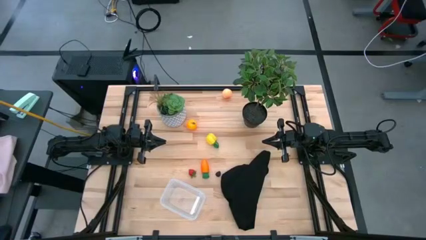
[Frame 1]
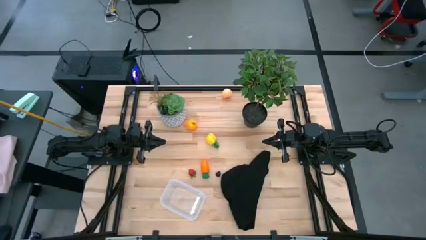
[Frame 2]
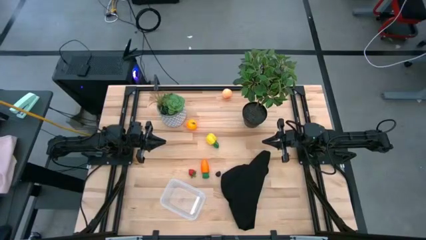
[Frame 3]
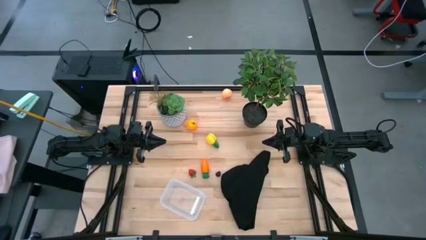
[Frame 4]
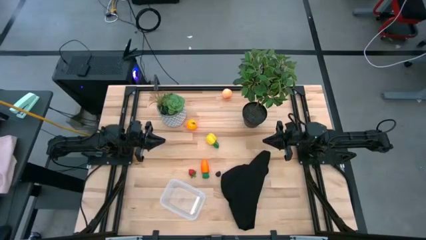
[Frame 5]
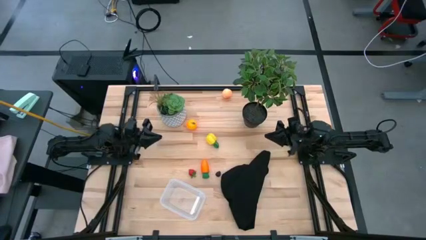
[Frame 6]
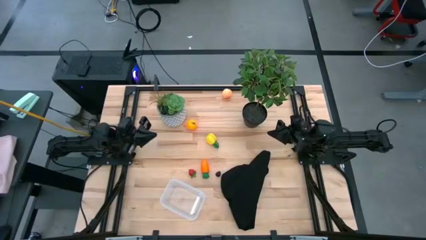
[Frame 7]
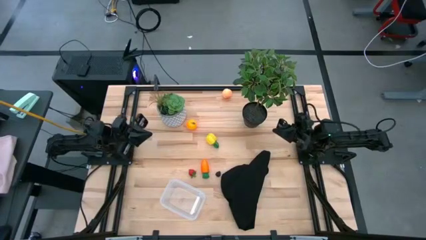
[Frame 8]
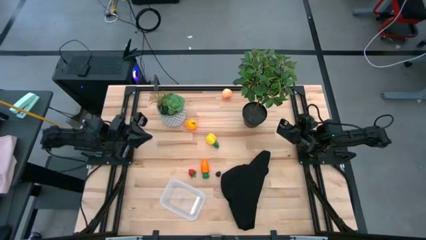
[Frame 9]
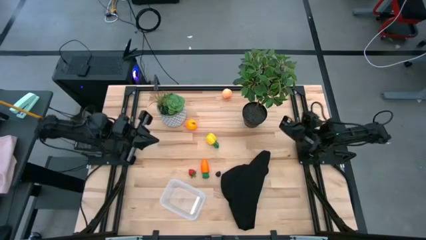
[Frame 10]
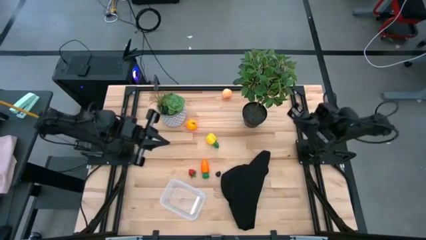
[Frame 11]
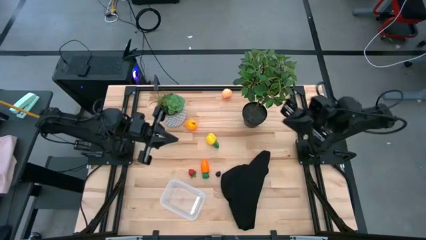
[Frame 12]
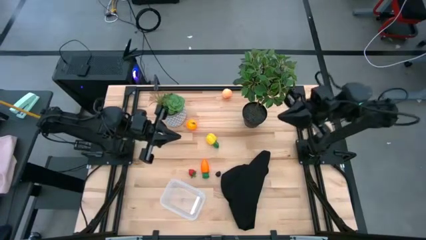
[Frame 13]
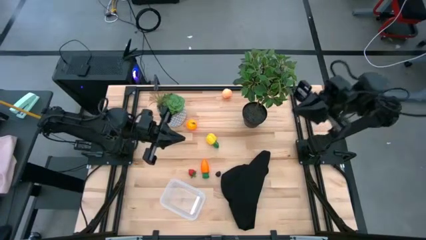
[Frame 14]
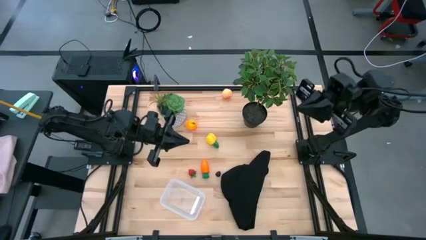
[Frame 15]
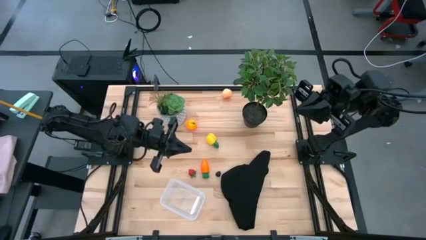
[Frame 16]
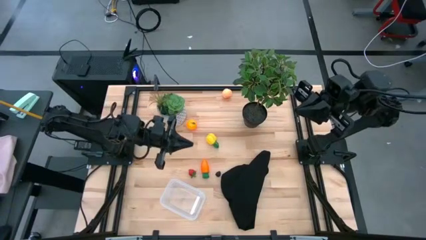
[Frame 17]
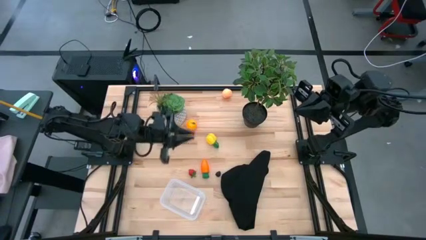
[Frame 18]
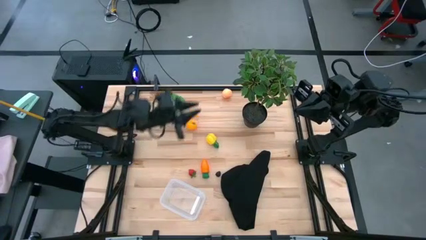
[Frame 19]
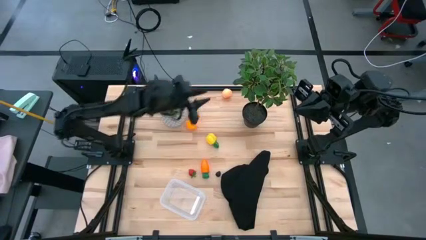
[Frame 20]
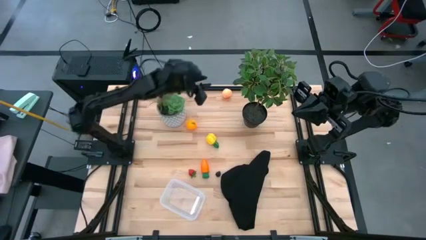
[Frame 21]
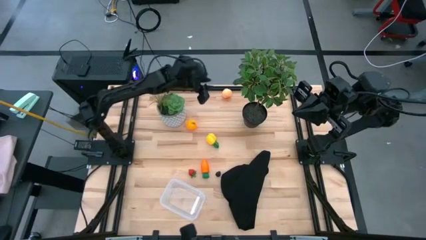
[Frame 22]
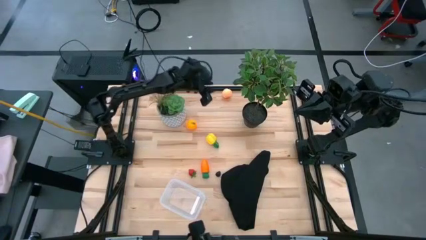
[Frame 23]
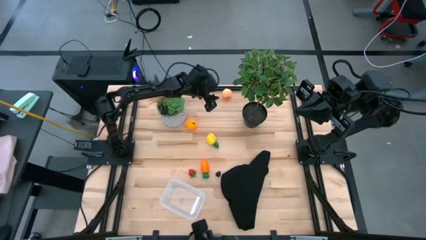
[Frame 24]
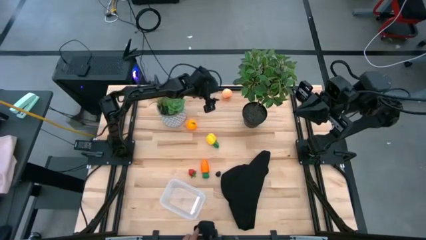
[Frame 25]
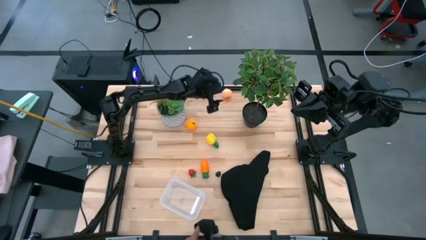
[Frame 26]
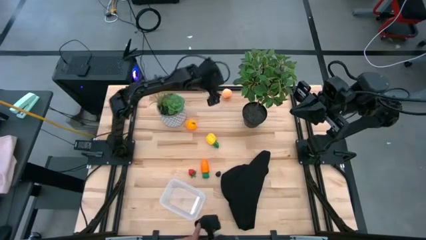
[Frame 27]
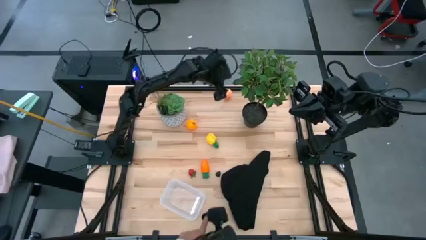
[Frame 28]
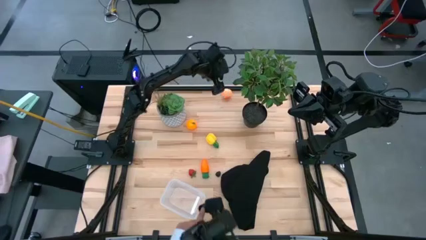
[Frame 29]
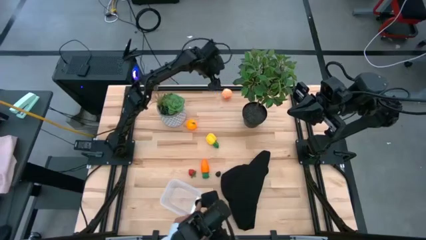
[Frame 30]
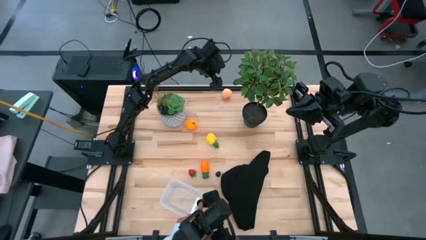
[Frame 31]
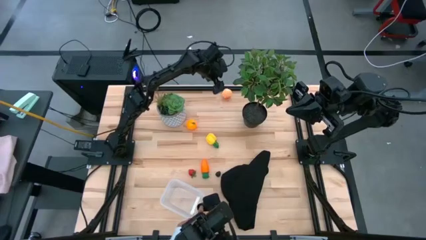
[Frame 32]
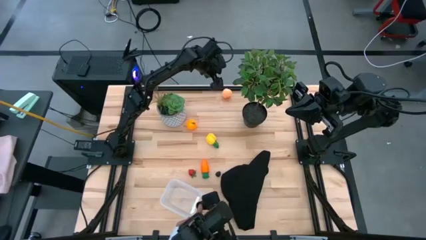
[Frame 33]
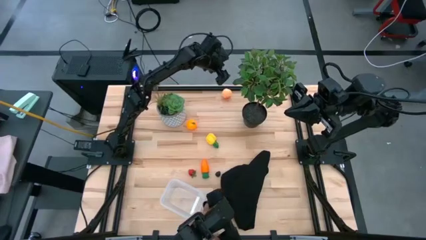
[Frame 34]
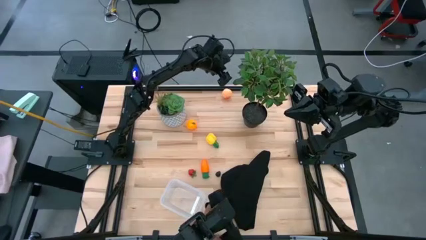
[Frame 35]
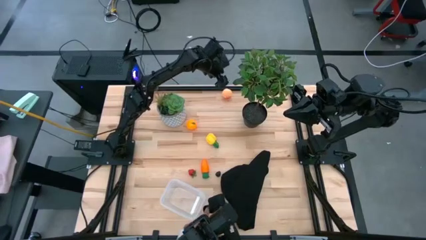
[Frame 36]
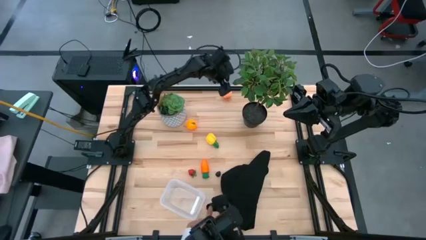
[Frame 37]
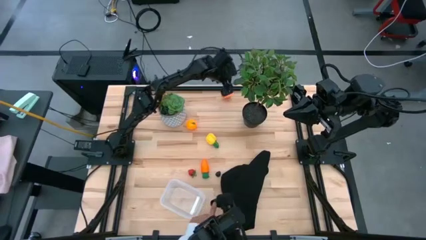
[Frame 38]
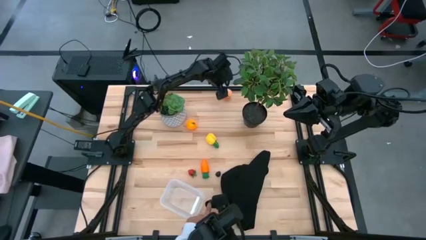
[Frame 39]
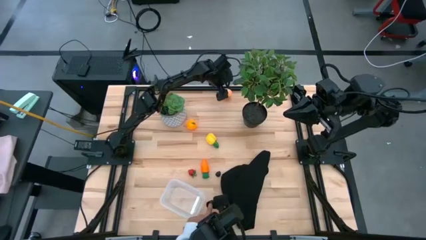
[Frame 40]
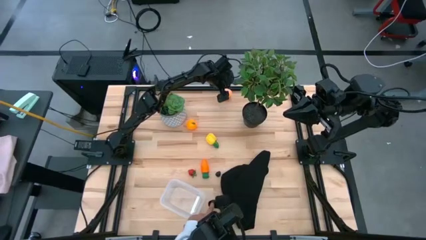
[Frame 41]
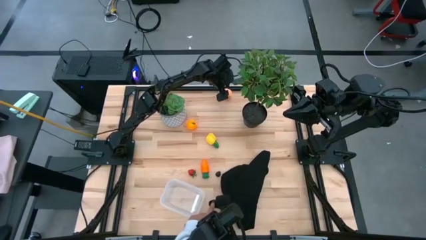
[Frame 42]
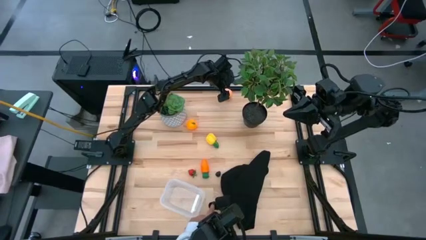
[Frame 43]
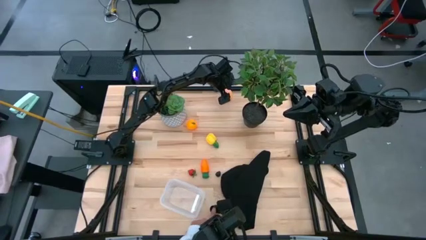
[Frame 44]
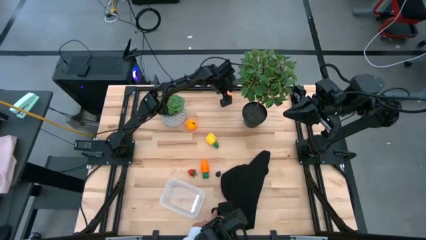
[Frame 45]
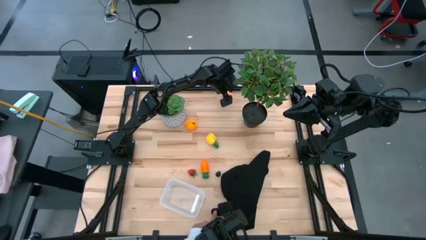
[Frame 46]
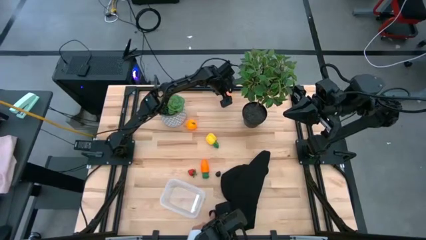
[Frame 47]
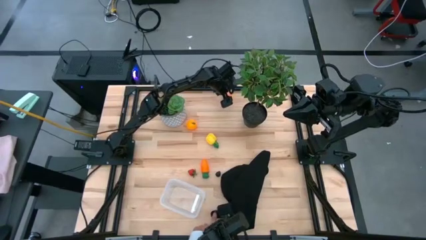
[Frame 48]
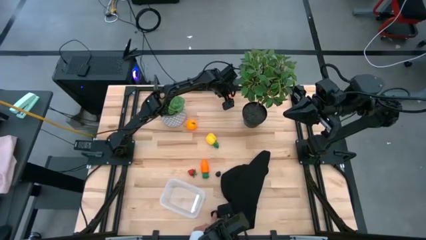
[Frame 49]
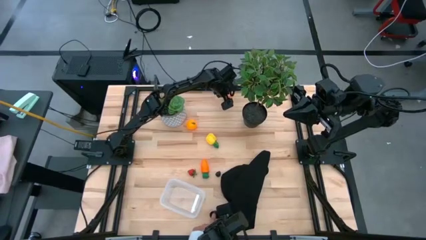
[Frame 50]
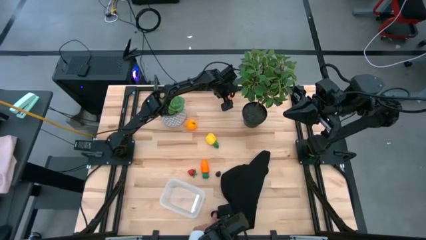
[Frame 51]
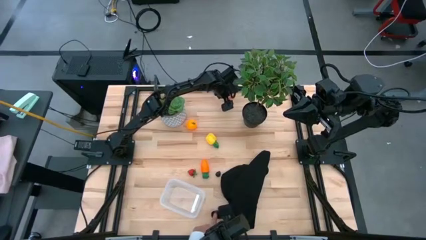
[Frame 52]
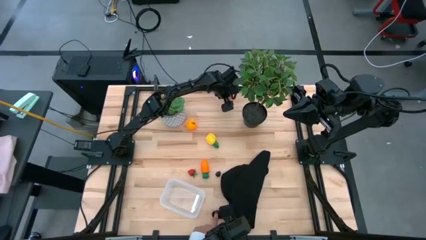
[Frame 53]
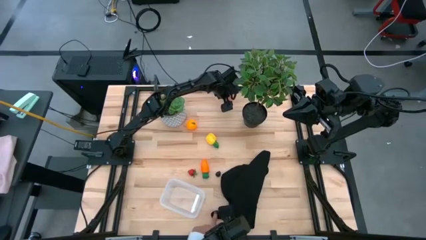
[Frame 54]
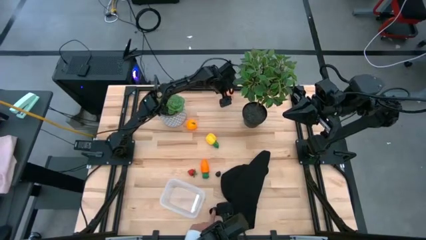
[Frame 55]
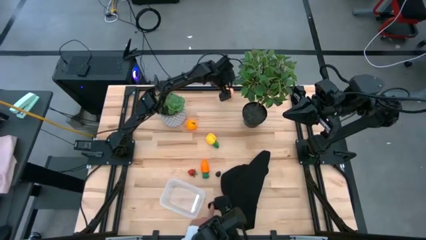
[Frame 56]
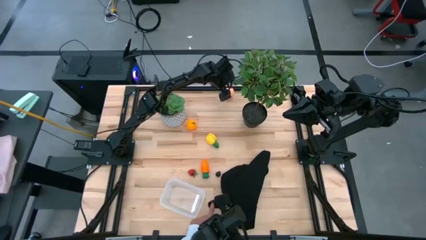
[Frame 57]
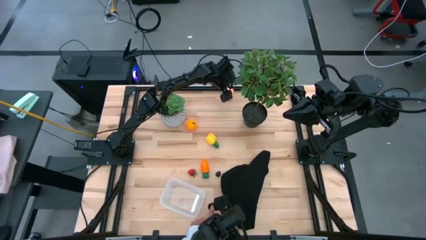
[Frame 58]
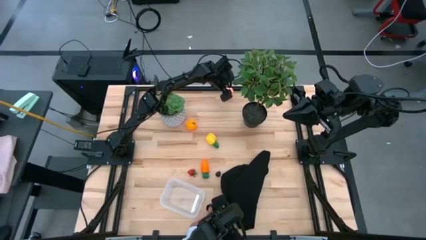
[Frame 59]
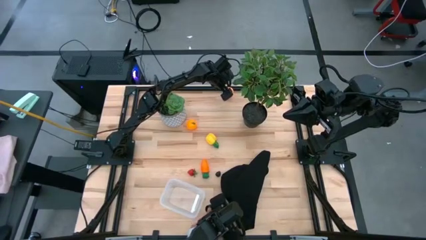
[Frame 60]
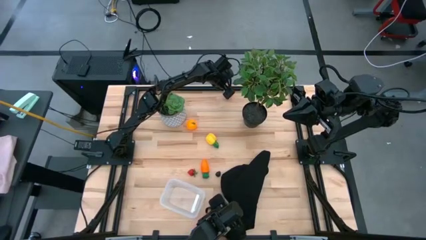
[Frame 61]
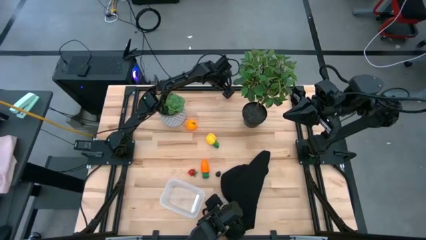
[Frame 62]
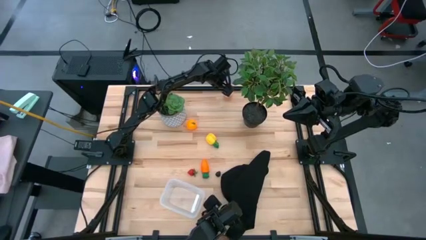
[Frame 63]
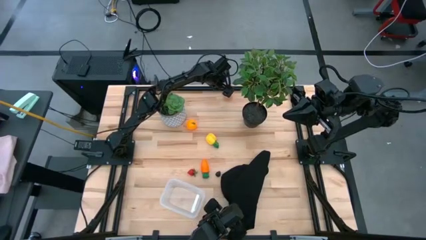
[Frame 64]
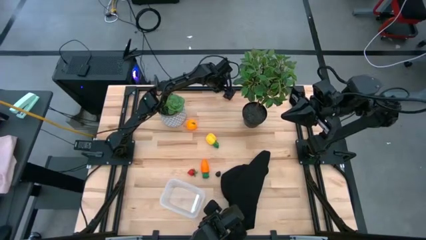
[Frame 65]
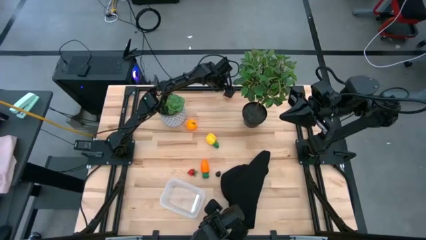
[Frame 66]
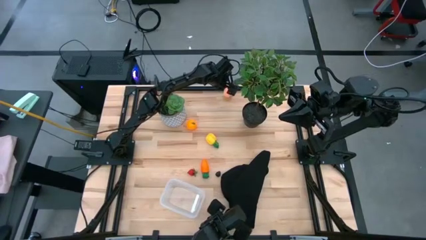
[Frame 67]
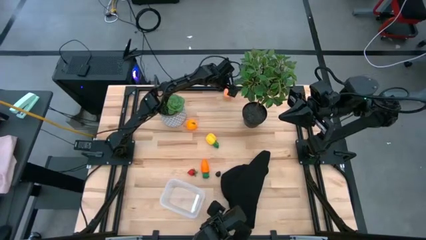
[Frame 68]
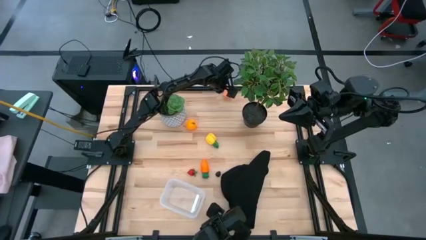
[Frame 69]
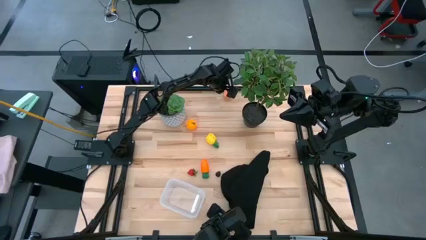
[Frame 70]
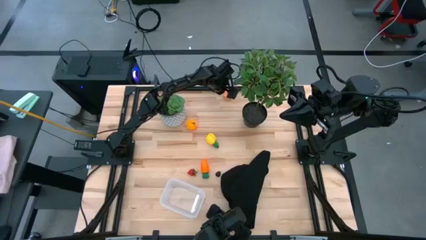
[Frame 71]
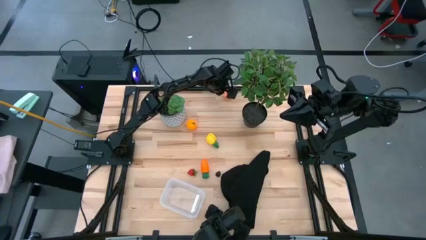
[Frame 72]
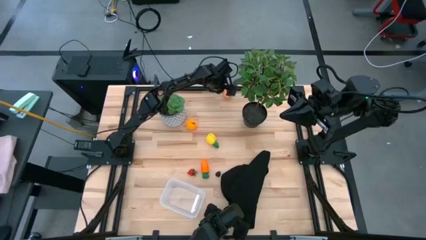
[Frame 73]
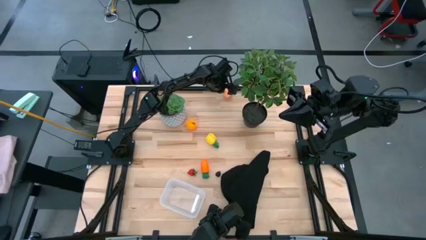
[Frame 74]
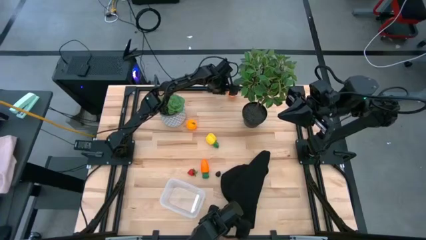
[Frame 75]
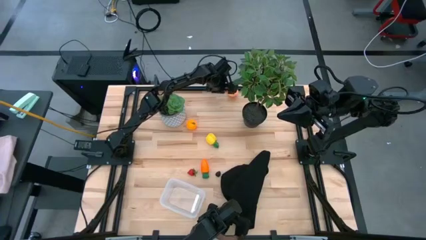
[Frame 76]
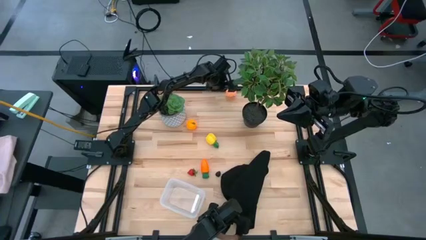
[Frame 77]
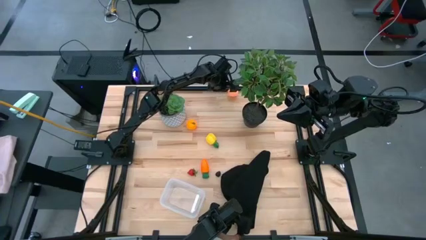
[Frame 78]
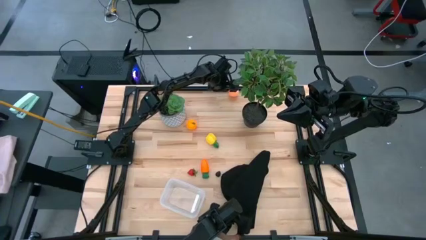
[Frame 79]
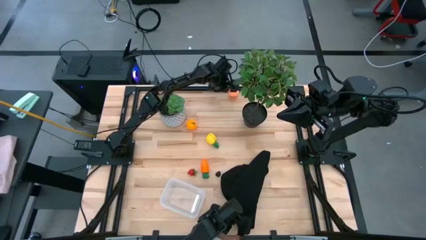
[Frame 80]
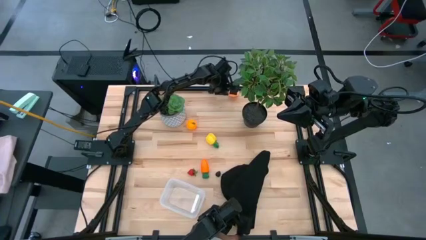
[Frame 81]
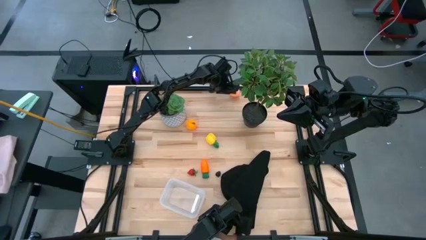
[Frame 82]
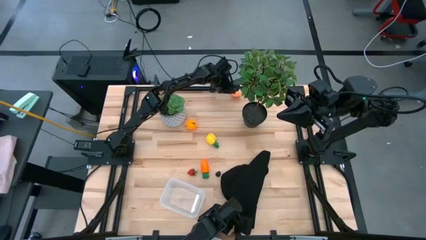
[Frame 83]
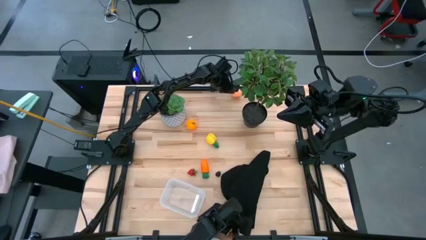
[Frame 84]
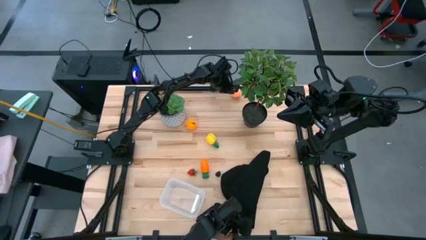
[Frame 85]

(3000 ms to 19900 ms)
Task: Pick and placing Produce into tupperware
Put the peach into the transparent bin
